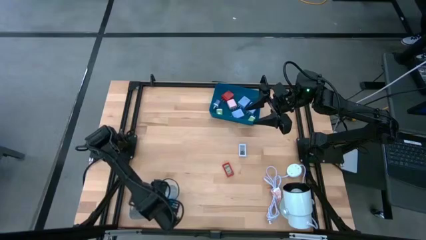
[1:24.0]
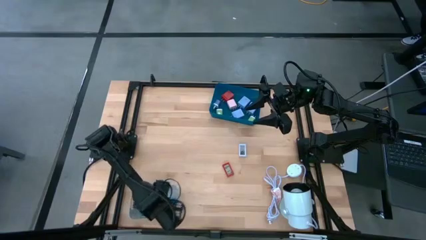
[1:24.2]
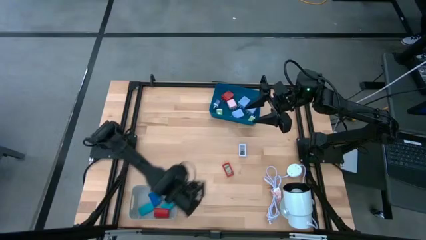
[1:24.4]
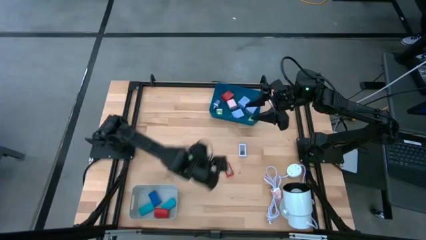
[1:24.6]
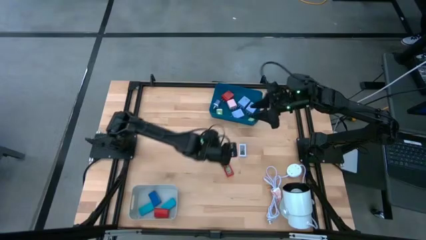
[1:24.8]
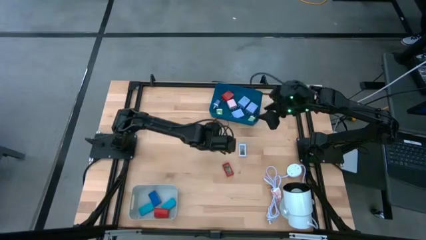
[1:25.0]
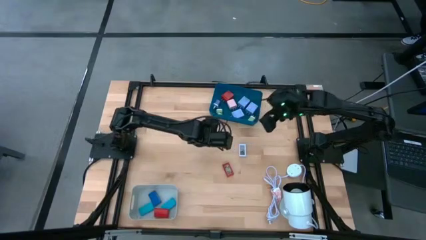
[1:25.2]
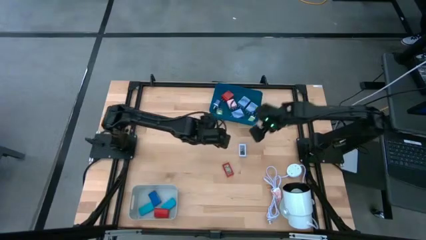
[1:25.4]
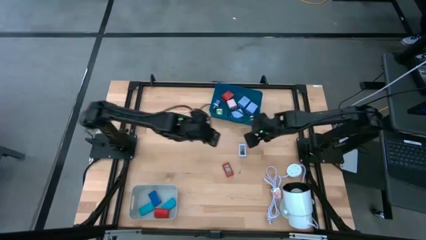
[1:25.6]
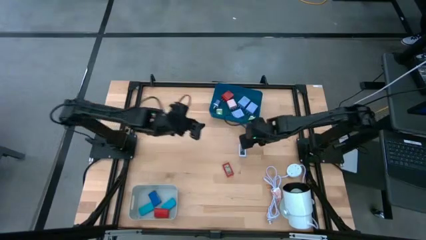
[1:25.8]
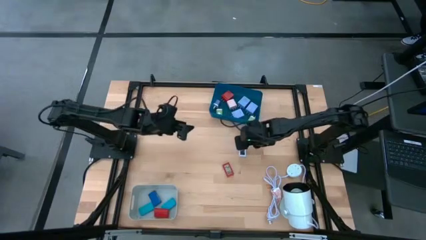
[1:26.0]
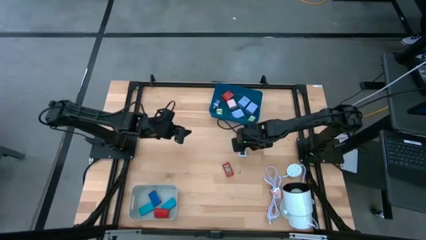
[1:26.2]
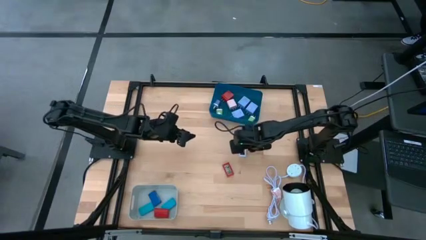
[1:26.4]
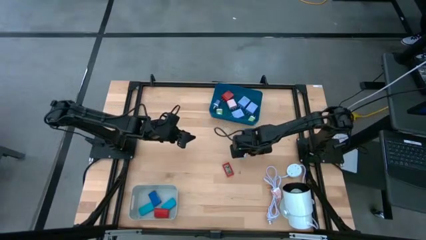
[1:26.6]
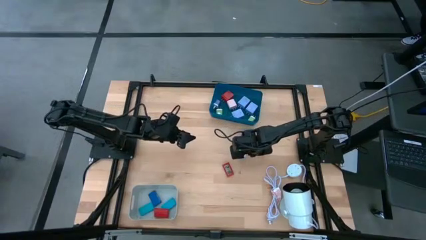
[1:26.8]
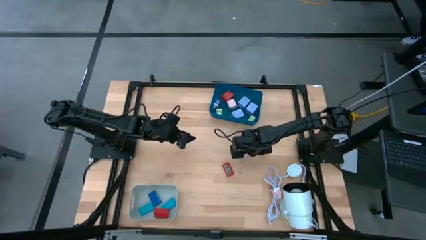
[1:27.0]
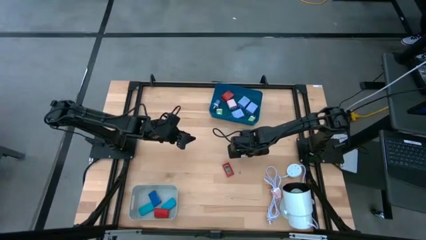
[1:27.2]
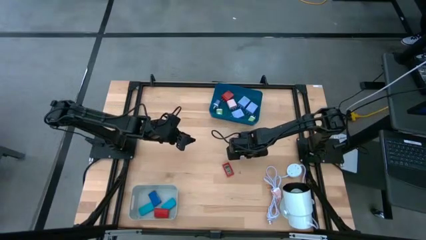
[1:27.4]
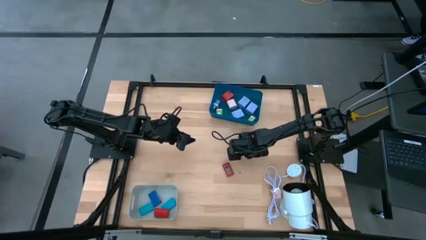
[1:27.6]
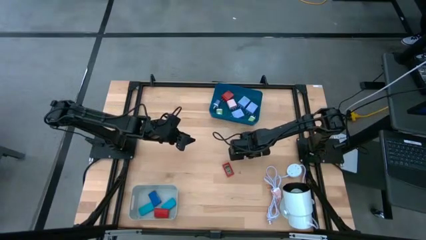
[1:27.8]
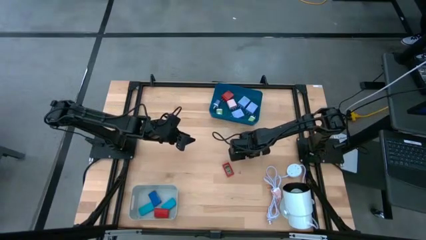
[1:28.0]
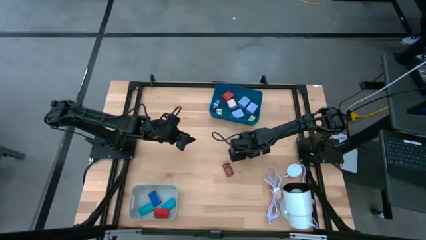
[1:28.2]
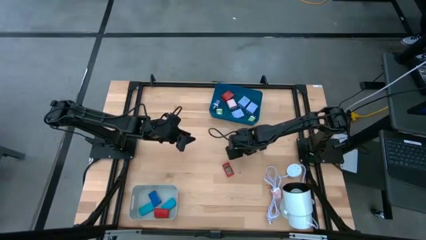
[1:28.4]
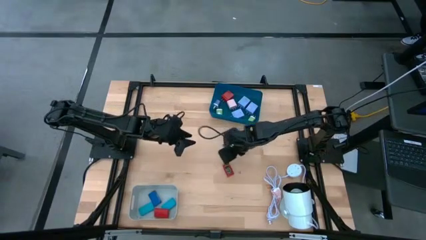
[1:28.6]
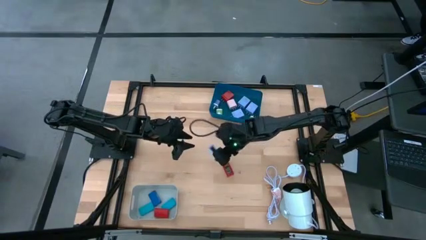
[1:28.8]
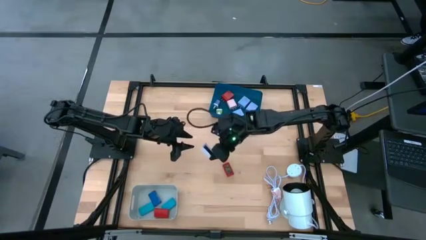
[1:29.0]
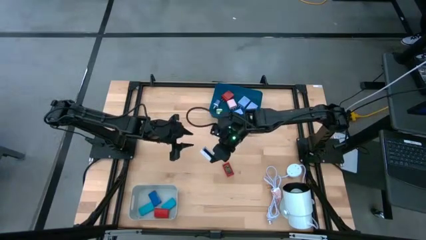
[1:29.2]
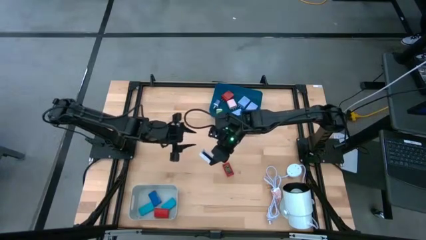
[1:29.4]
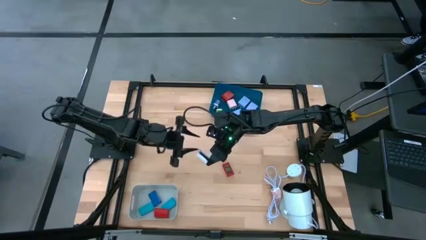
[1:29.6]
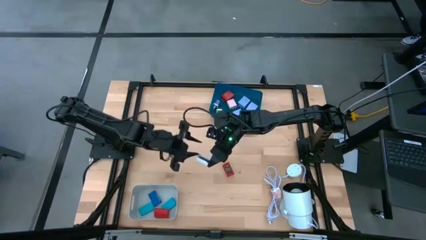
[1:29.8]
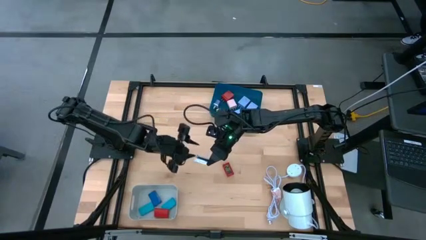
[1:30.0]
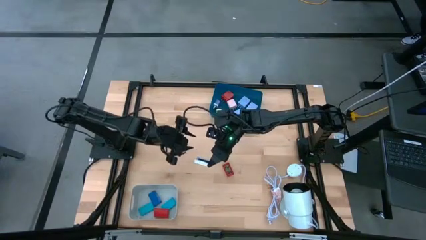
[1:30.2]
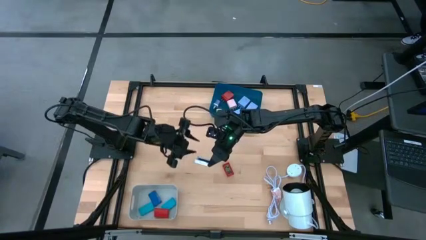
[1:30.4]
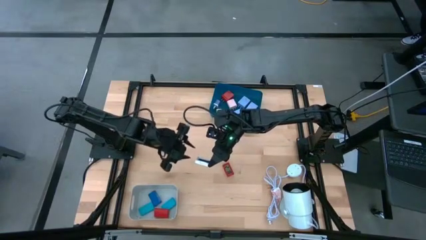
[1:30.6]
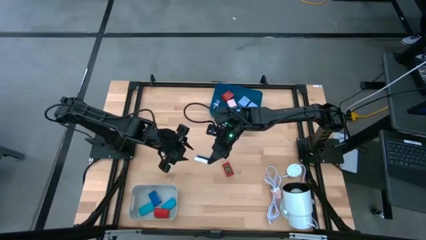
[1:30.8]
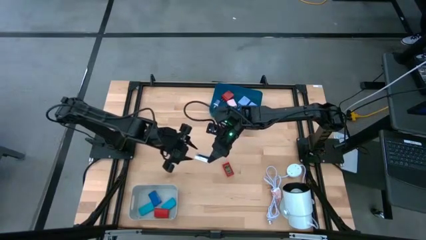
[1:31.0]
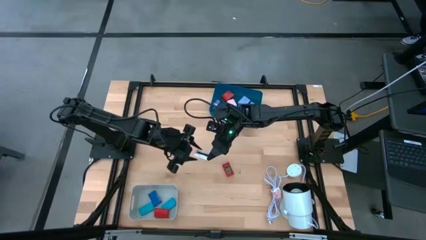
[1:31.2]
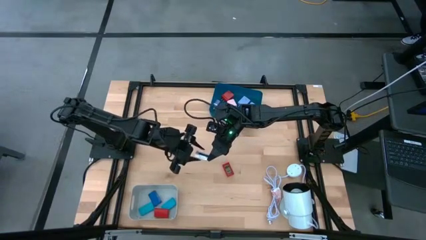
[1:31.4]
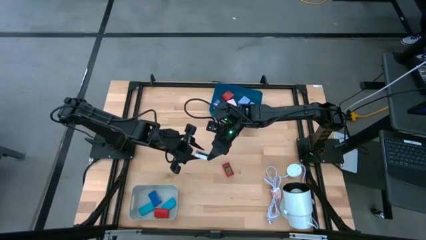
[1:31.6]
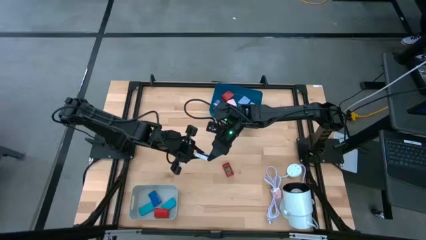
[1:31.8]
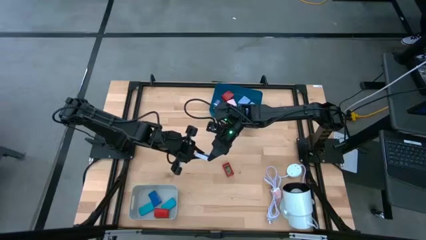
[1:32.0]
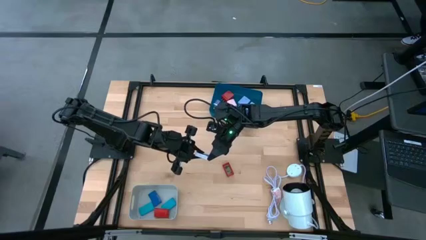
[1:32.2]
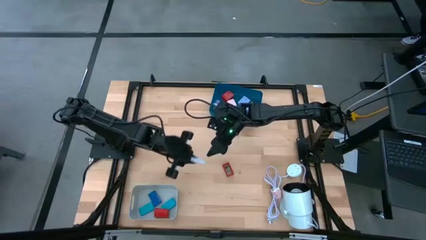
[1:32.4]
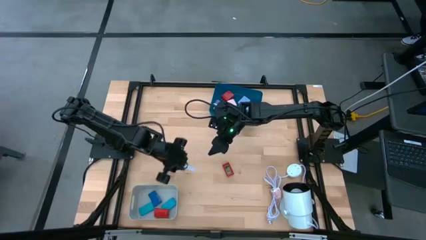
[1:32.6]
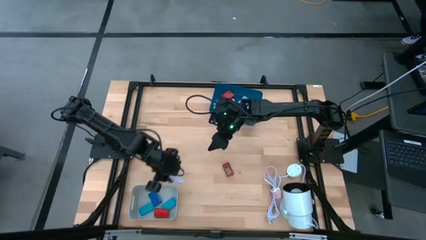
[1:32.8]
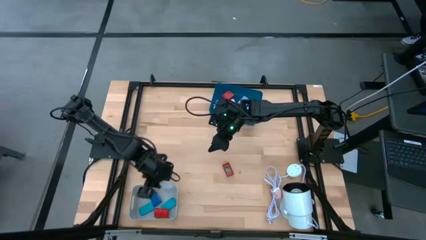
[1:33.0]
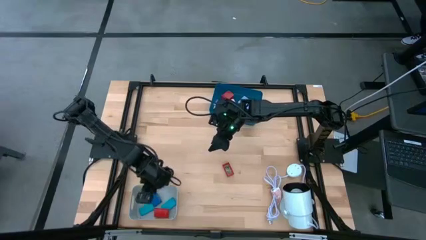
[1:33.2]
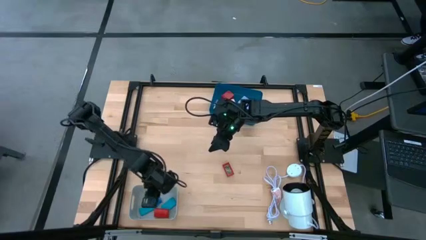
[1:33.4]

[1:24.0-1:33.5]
Task: Pick & Place Office items
Put the white digital timer into the white bin

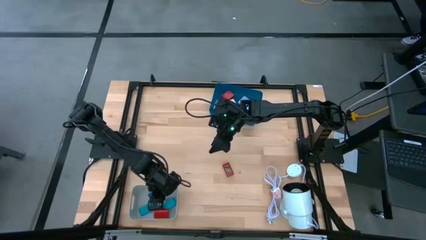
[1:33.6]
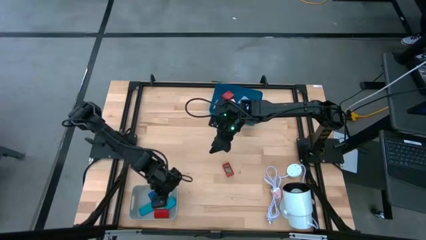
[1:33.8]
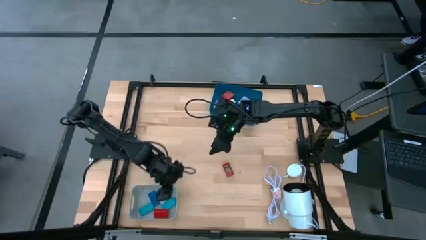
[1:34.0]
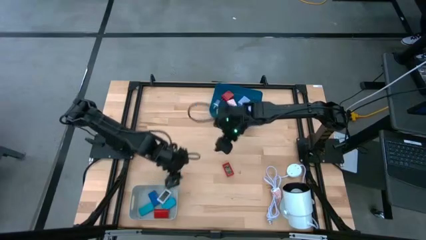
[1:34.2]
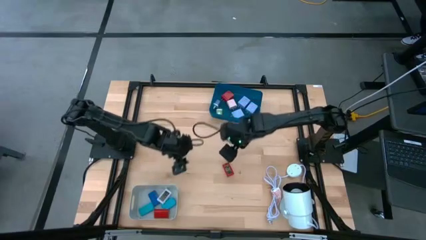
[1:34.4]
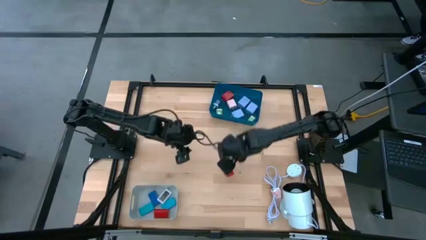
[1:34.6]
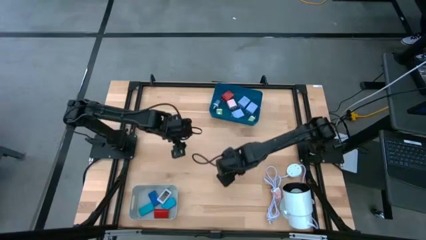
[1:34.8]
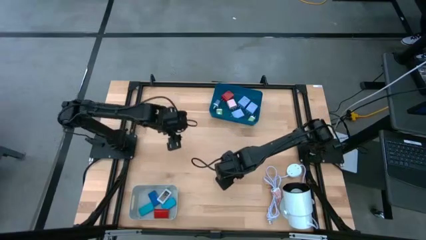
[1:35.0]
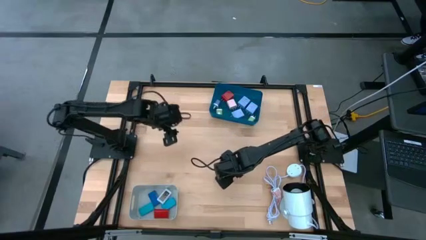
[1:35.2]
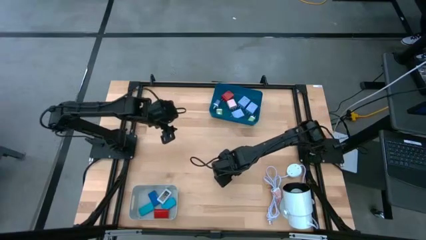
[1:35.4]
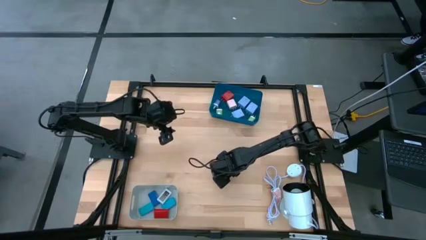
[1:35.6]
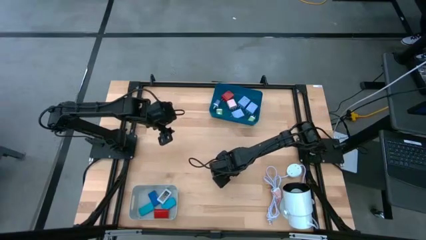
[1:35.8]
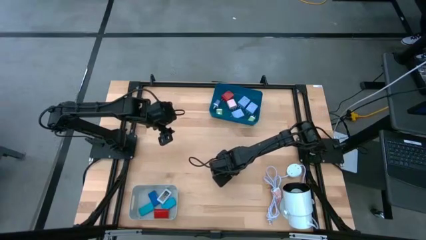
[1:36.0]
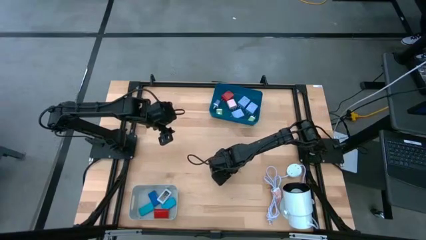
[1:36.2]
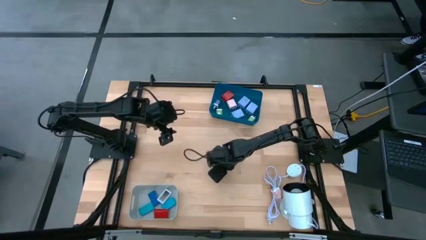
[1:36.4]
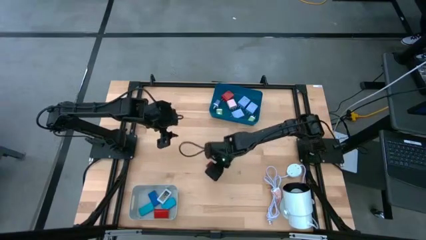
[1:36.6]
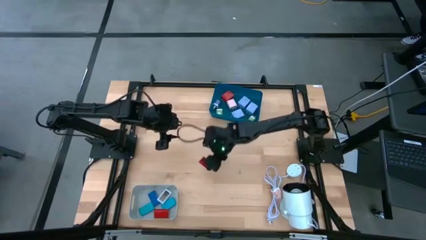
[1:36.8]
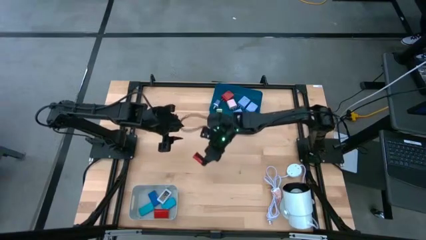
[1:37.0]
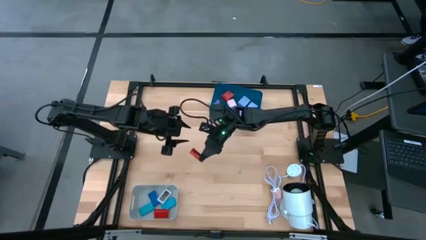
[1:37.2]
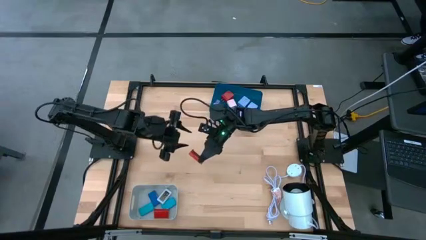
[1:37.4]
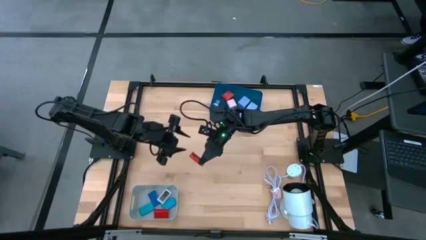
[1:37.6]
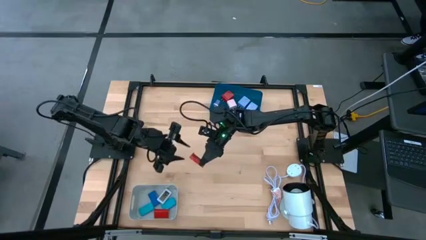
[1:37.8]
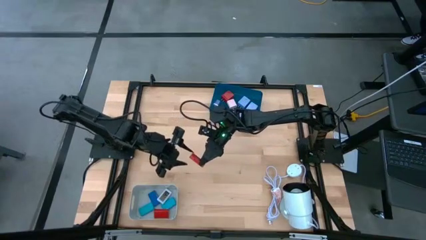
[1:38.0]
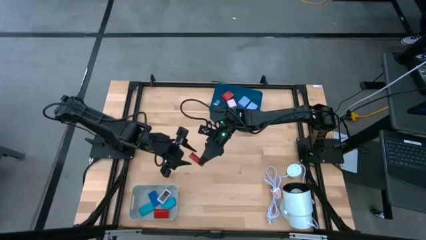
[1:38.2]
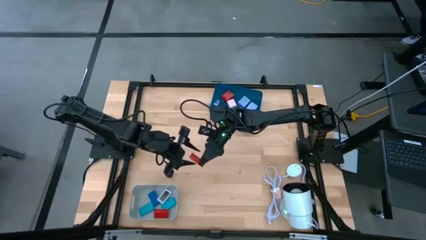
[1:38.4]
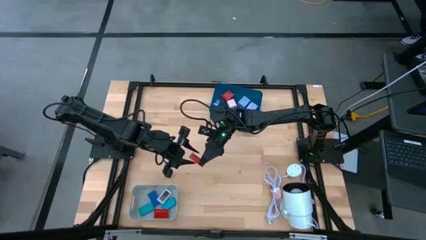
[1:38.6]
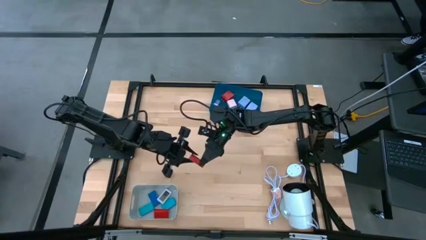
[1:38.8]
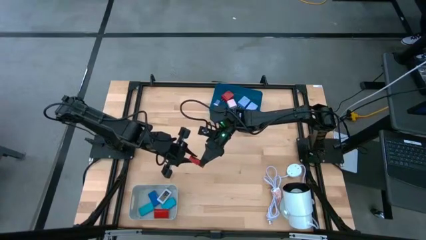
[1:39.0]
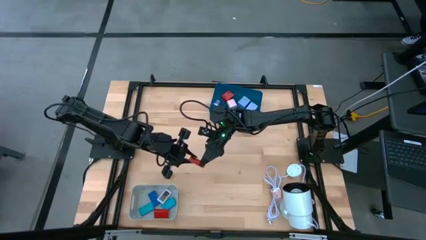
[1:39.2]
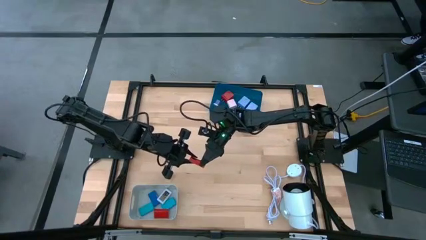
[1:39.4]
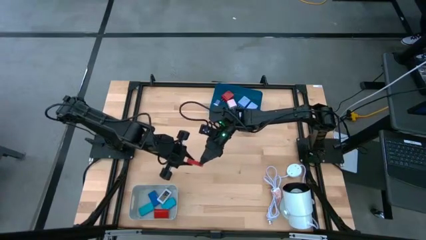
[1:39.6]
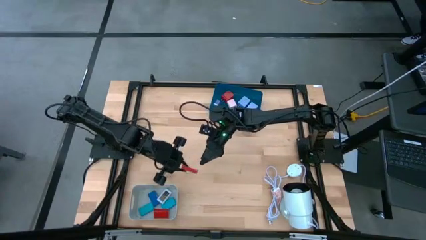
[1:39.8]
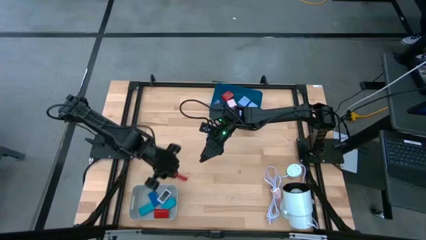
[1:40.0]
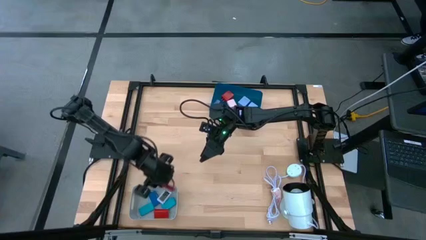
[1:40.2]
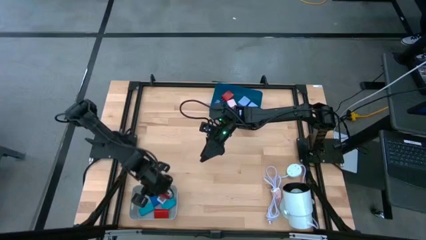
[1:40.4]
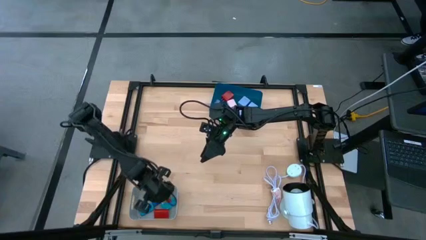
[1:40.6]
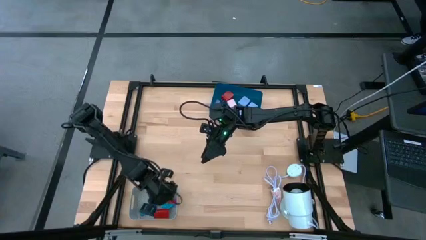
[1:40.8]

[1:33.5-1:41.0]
Put the red digital timer into the white bin
